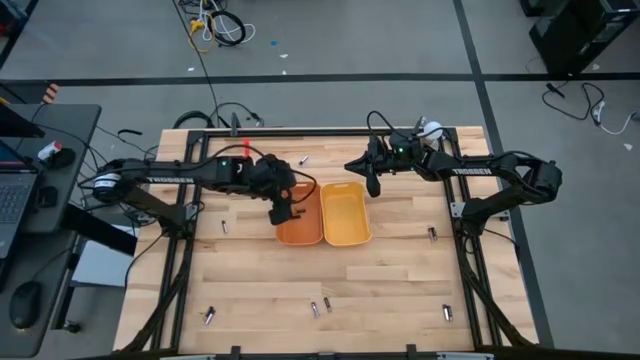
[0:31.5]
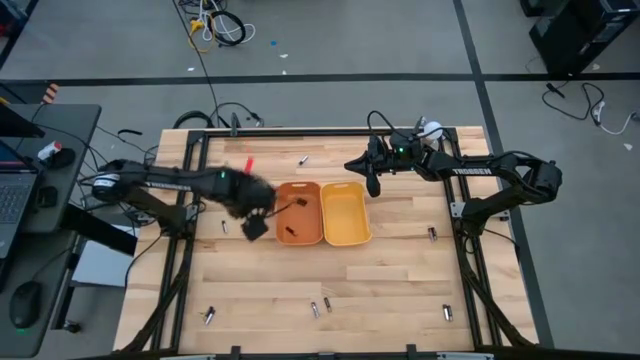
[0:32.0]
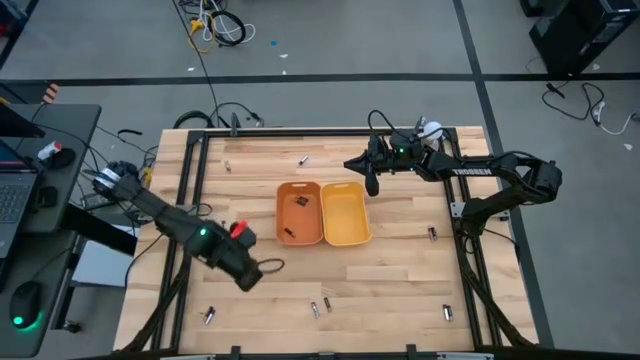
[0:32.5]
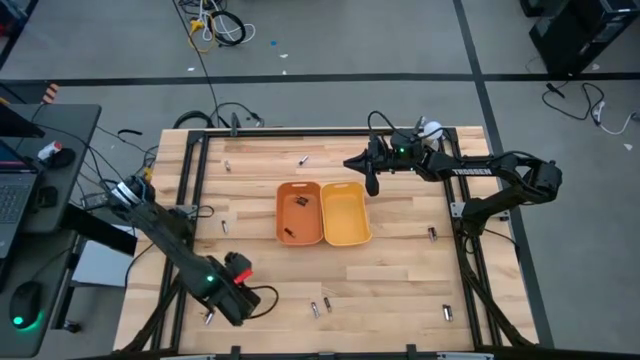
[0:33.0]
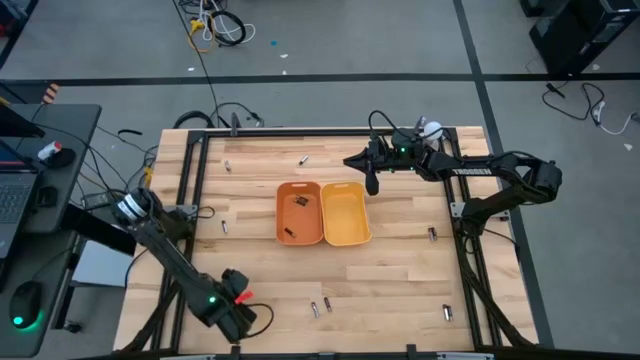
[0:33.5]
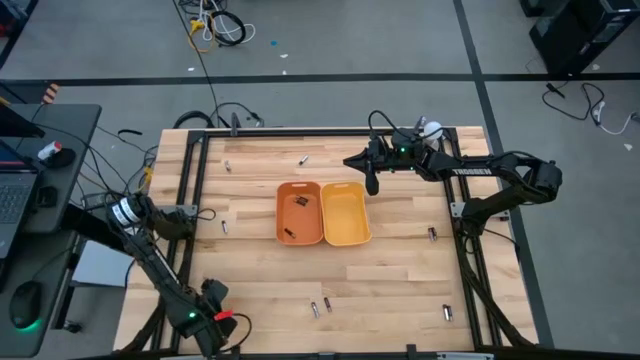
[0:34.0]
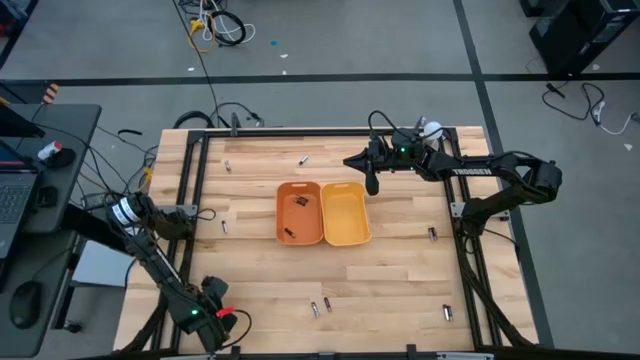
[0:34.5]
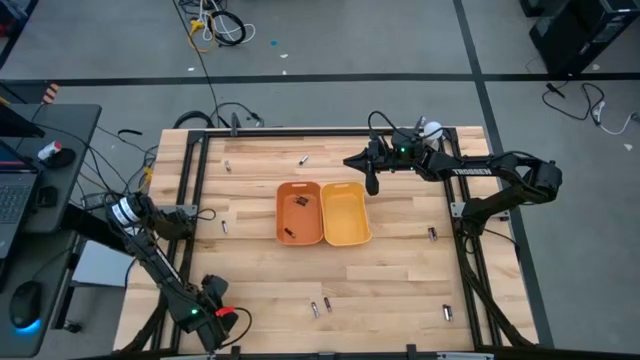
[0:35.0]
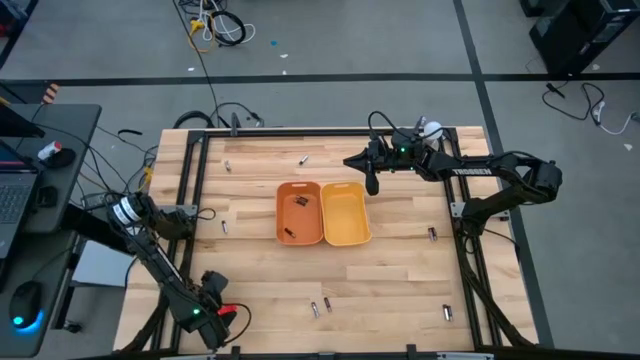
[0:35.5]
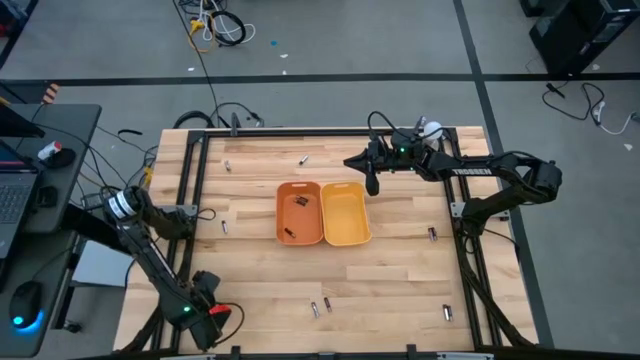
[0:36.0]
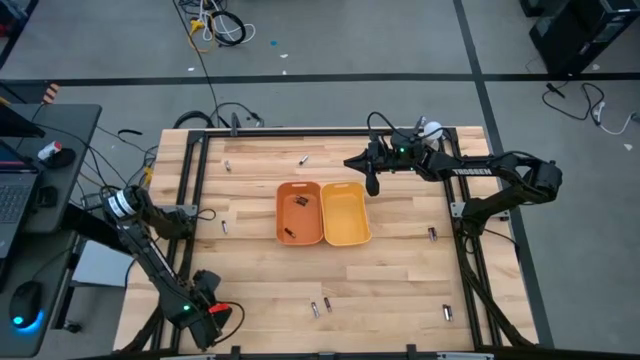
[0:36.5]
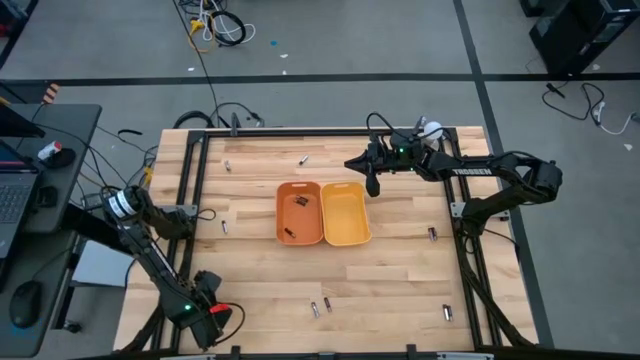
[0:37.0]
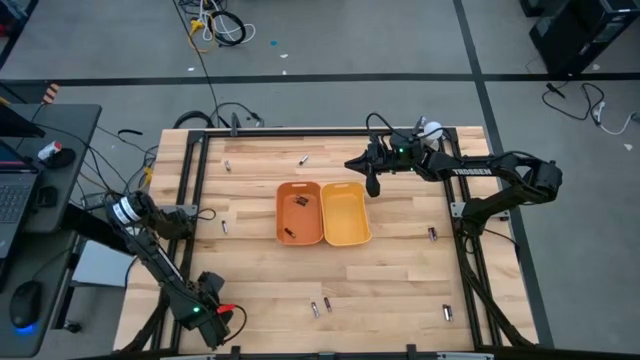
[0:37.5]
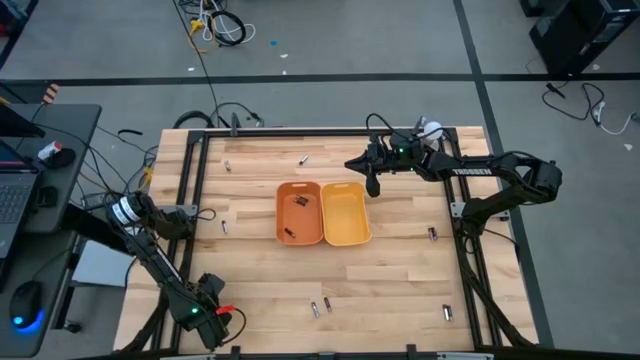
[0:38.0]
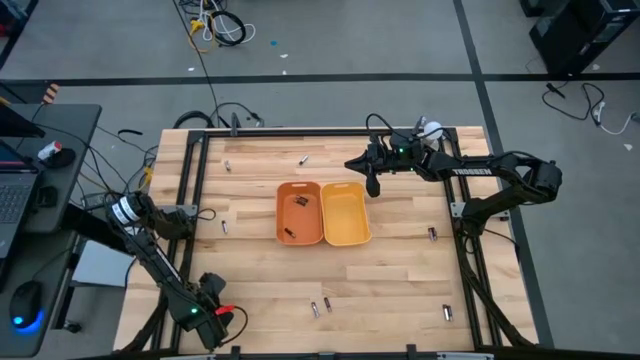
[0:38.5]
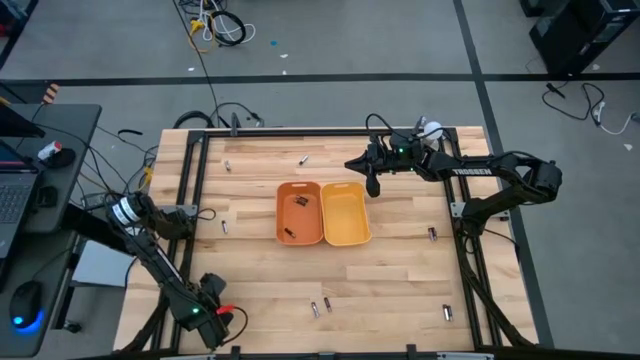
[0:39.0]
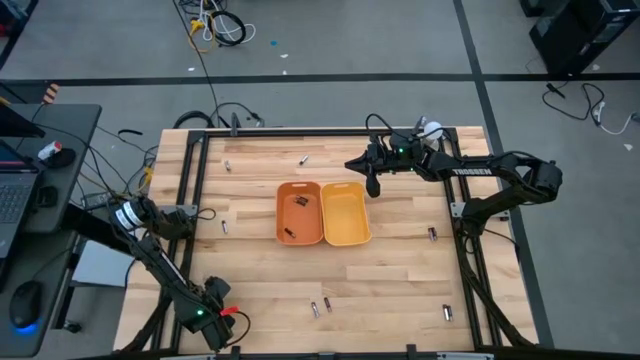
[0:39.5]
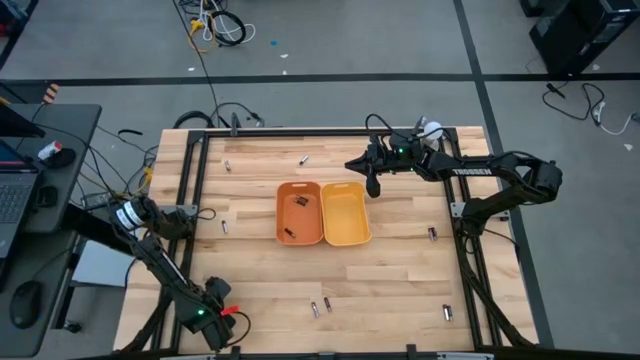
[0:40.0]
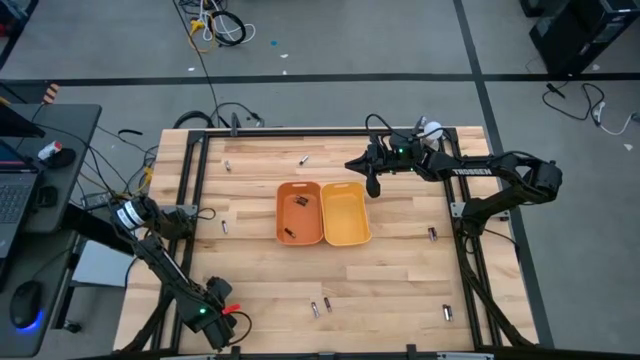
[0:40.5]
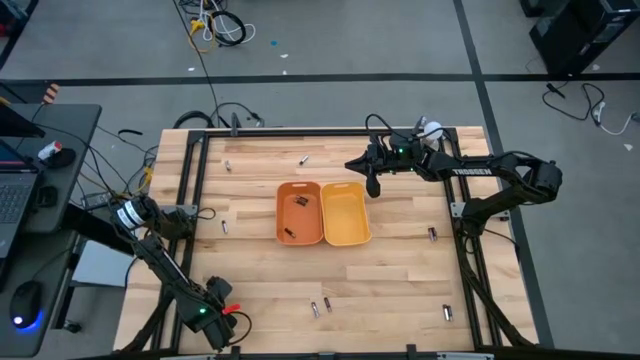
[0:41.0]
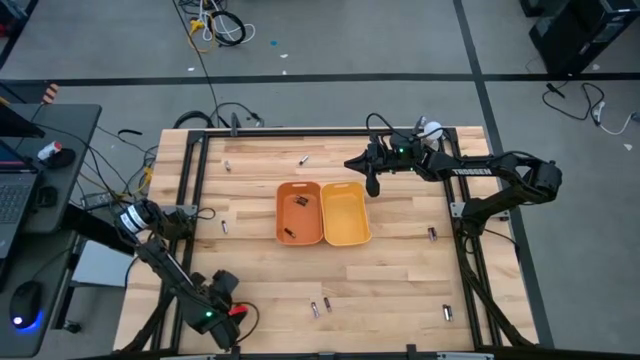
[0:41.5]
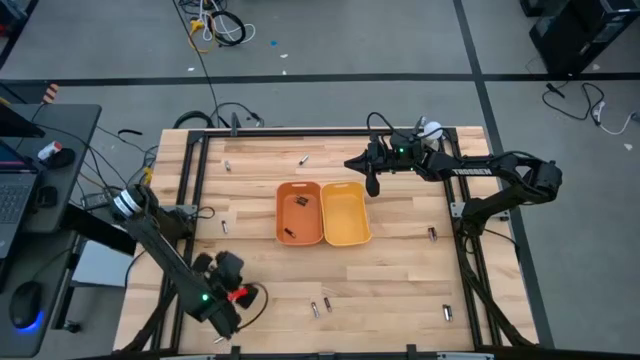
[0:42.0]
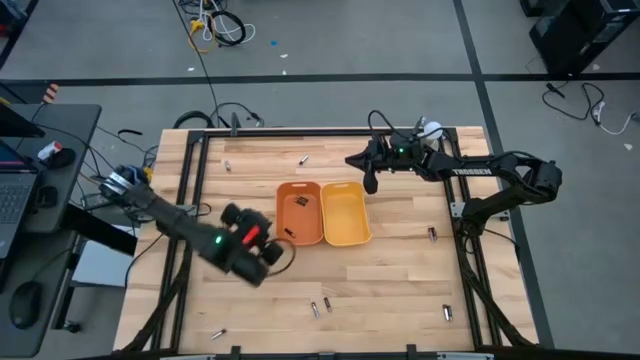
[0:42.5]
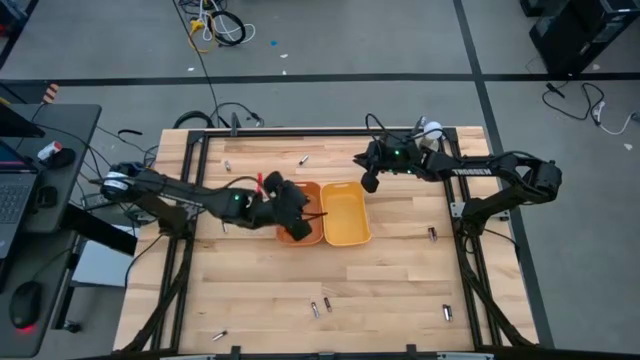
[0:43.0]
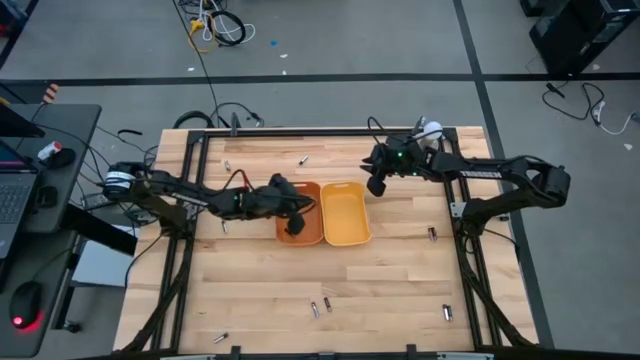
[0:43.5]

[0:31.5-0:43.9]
Task: Sort batteries
Put the black battery into the orange bin

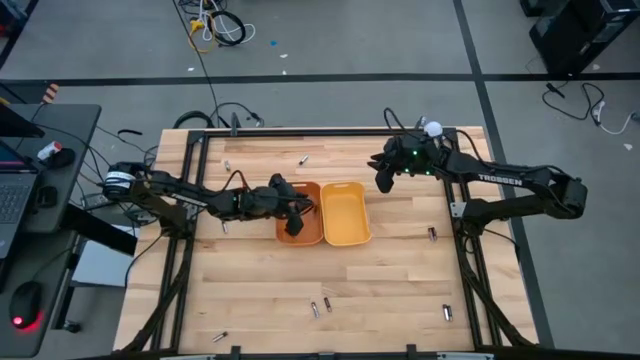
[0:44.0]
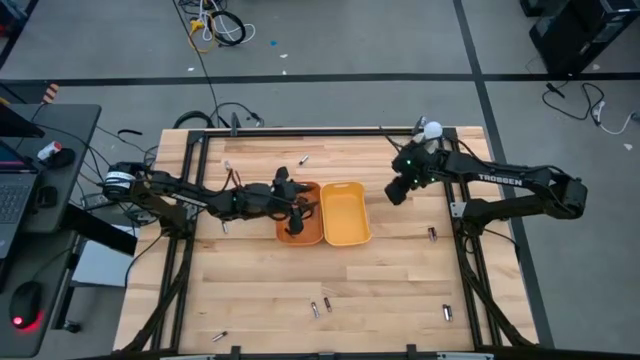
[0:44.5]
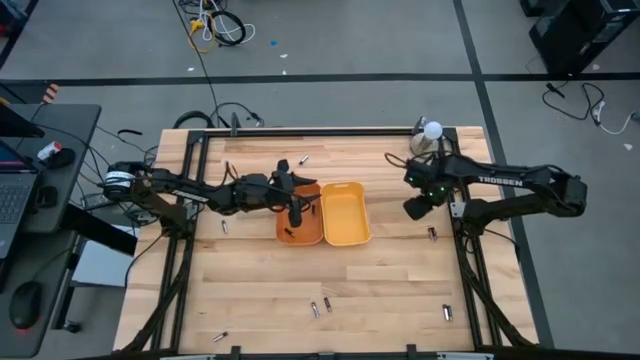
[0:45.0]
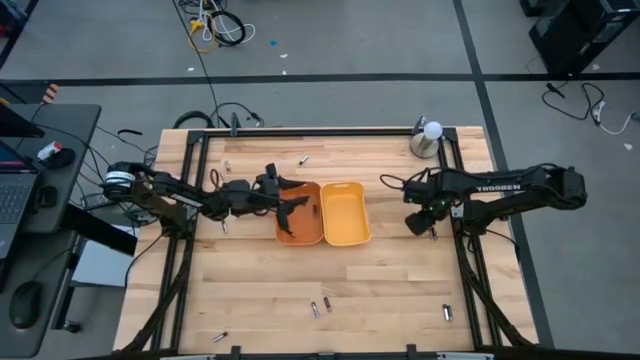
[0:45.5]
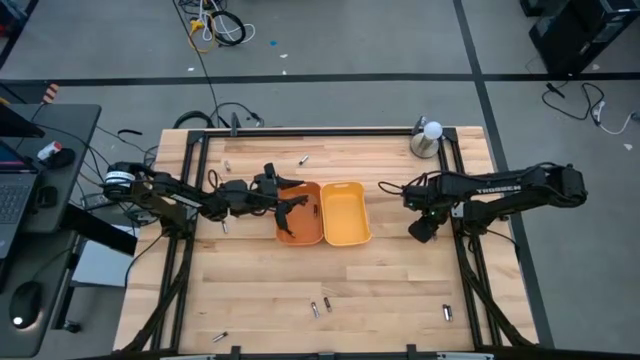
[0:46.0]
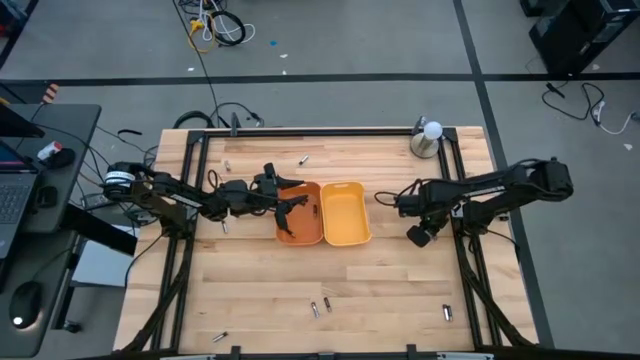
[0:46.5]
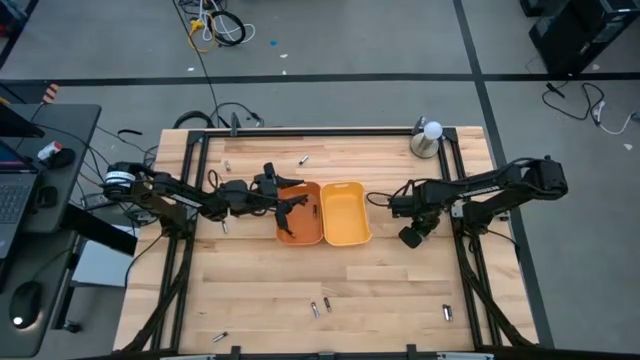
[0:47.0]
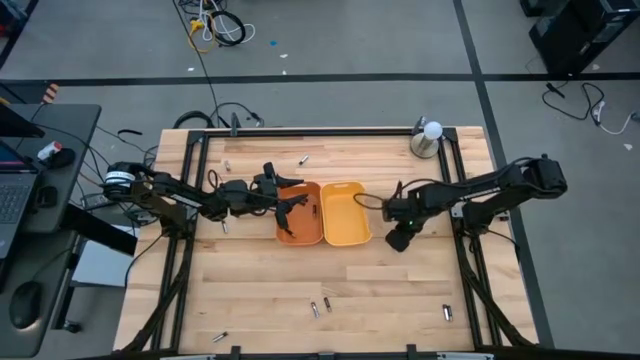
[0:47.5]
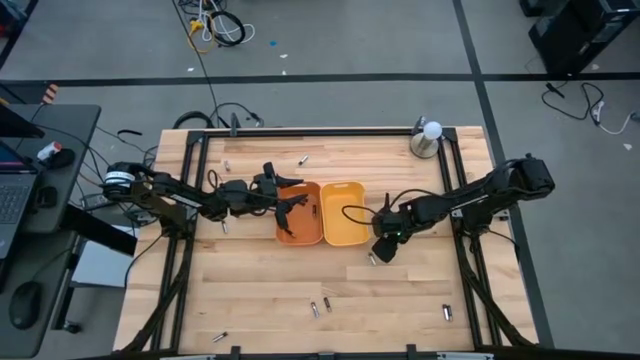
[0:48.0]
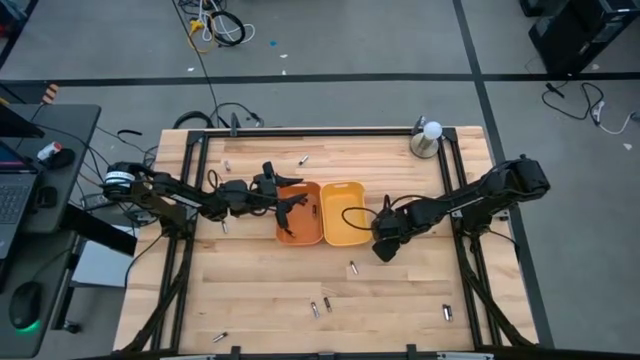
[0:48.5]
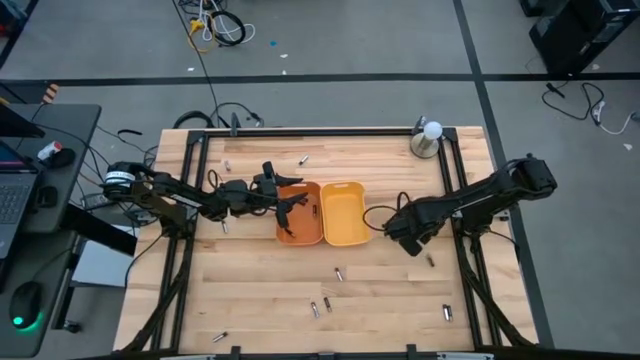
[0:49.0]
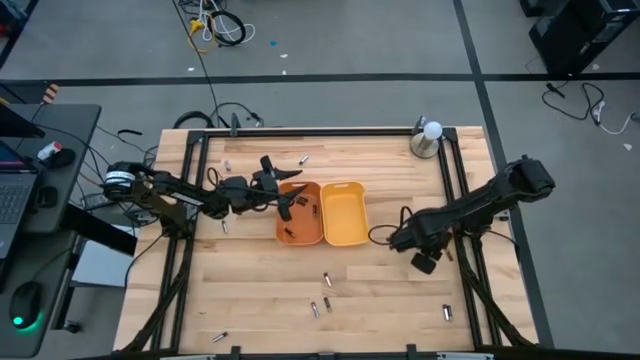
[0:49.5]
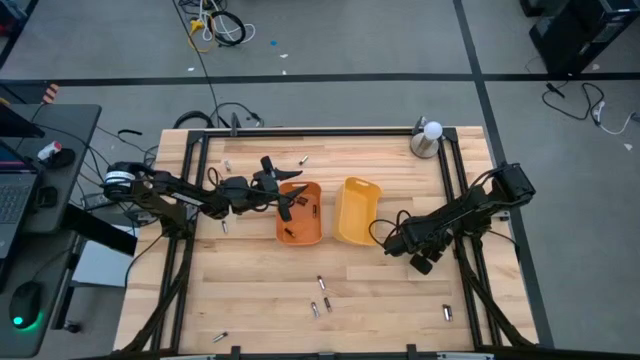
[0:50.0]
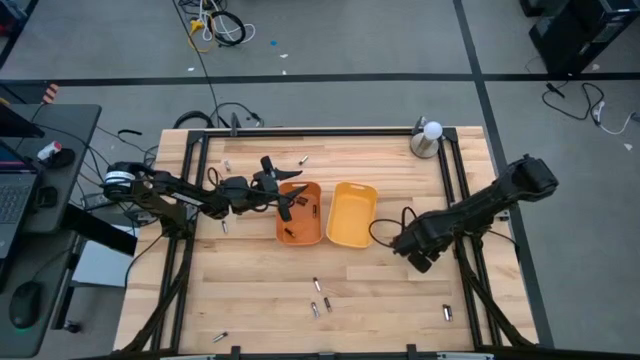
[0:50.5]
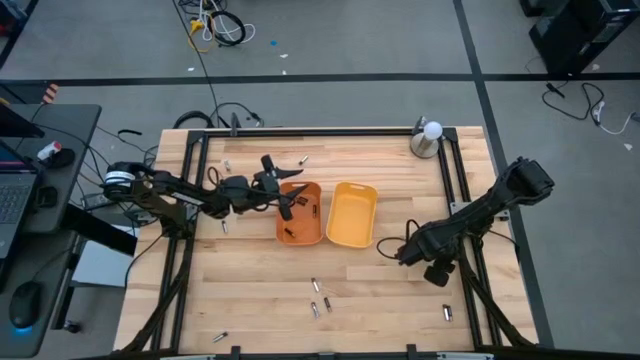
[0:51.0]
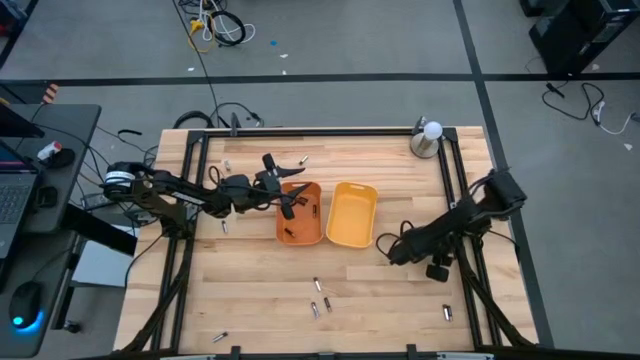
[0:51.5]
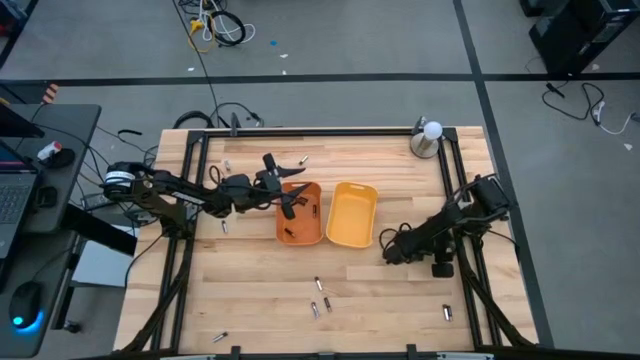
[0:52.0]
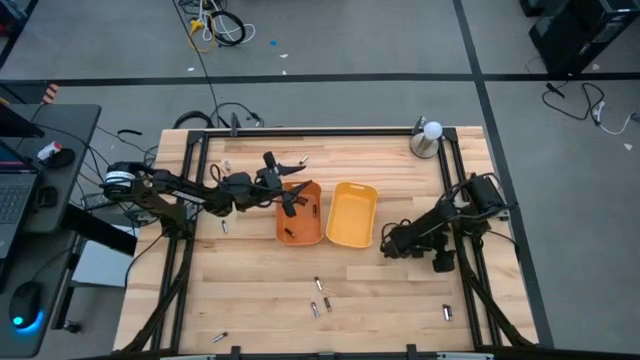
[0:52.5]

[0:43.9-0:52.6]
Put the black battery into the orange bin

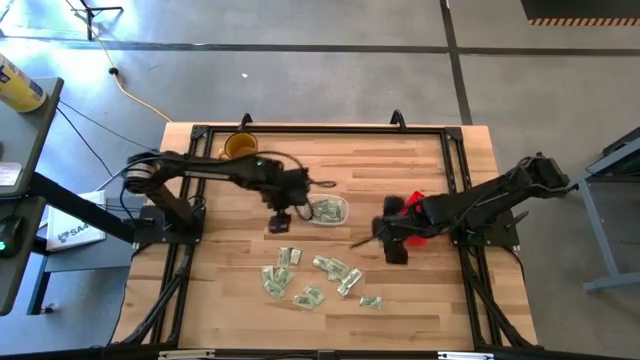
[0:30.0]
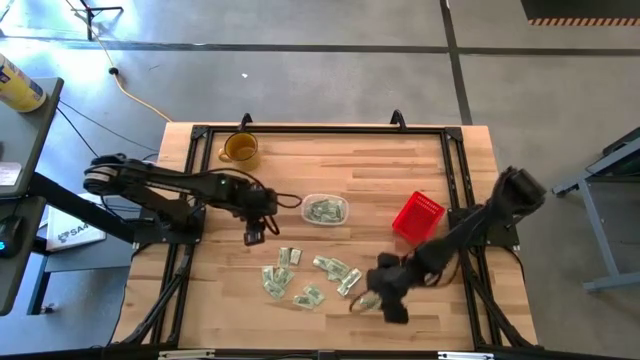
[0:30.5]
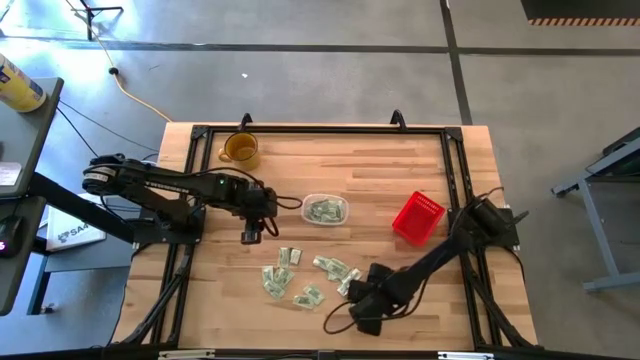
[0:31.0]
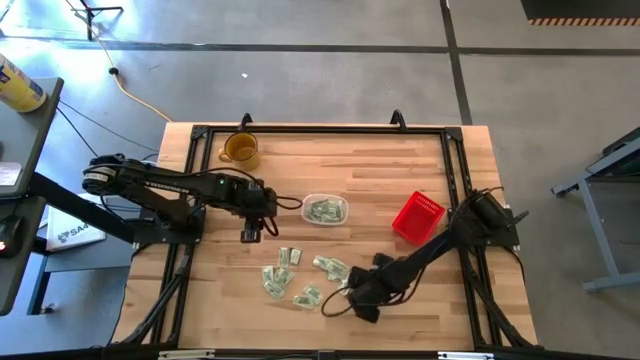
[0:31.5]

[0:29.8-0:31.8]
Task: Pick and place items into bin
Put the white stevia packet into the transparent bin
